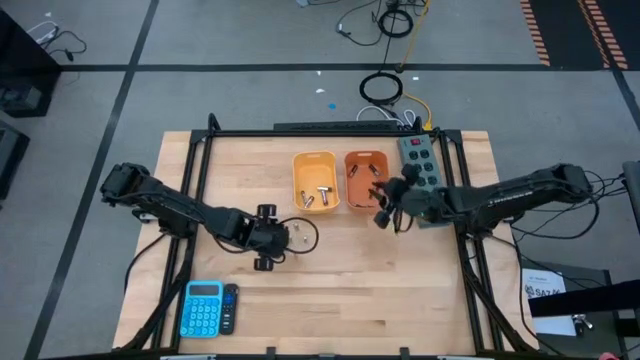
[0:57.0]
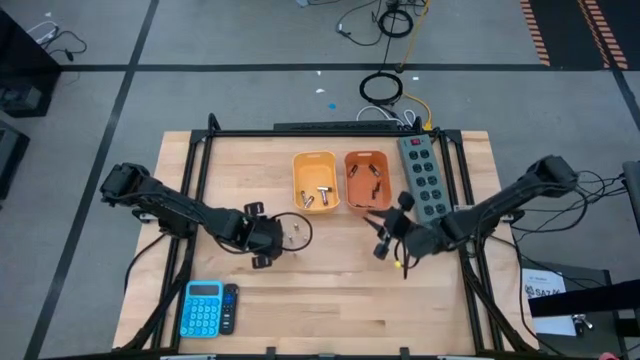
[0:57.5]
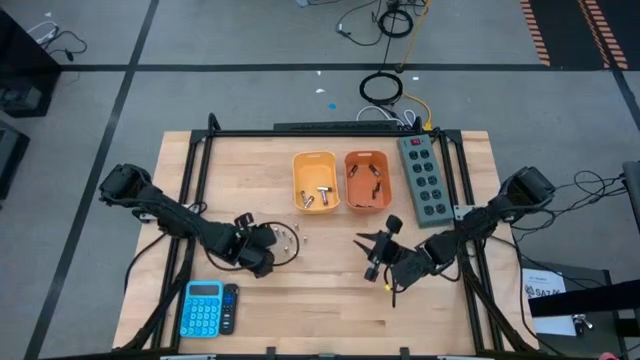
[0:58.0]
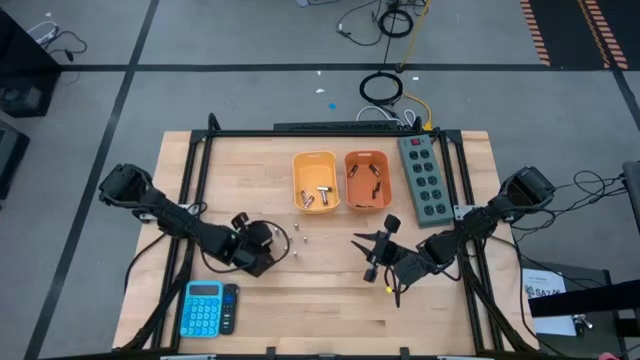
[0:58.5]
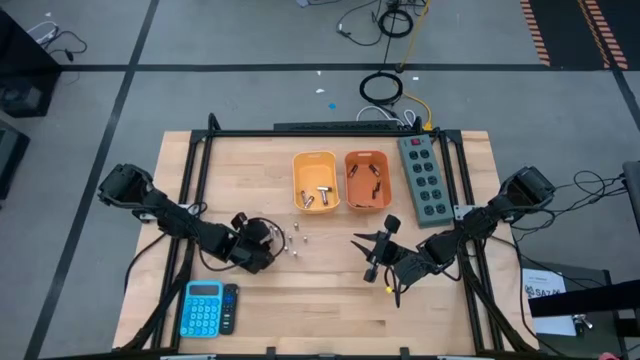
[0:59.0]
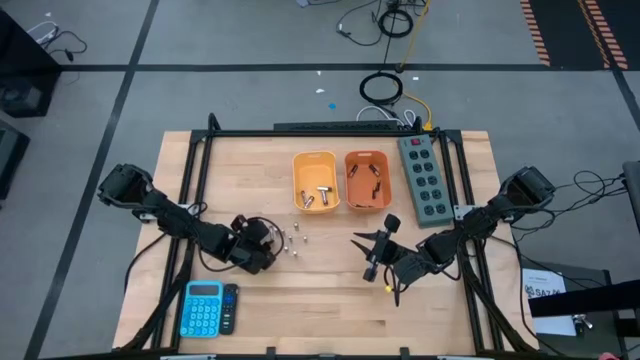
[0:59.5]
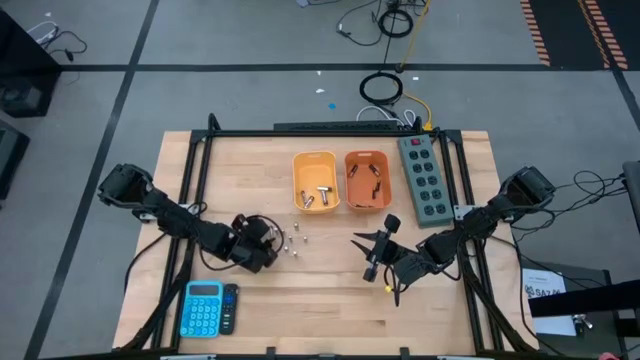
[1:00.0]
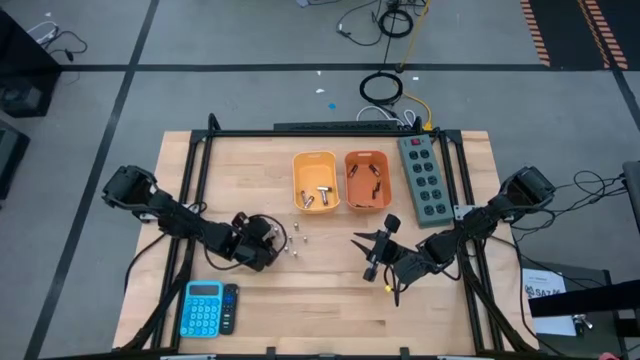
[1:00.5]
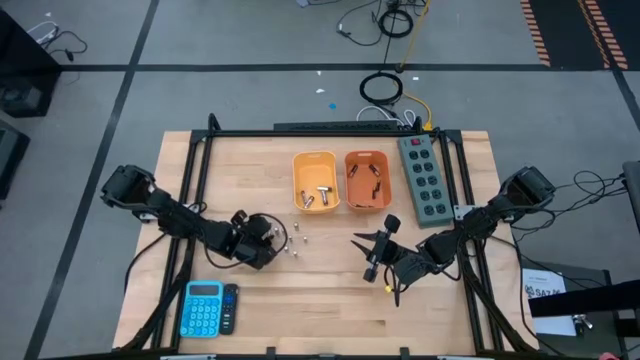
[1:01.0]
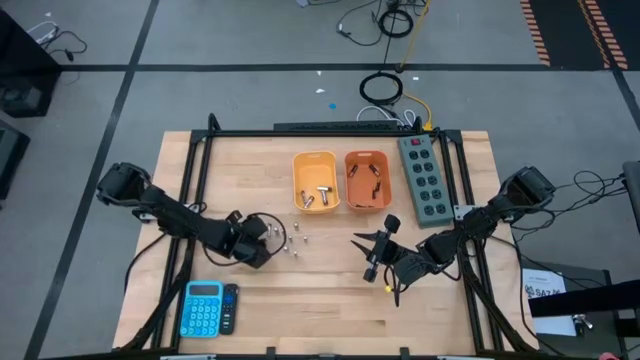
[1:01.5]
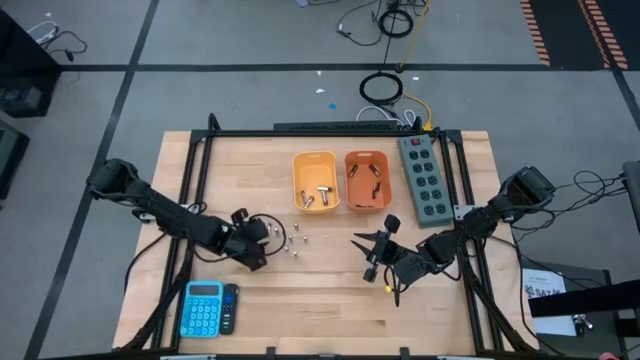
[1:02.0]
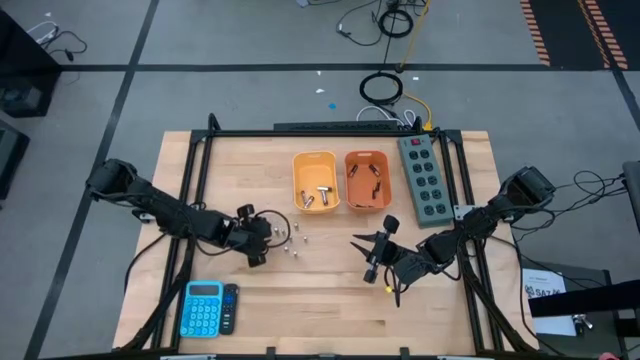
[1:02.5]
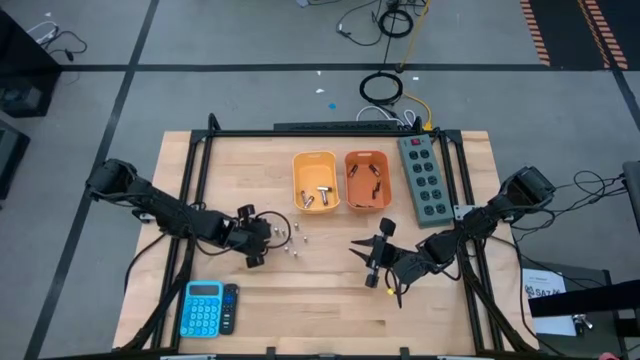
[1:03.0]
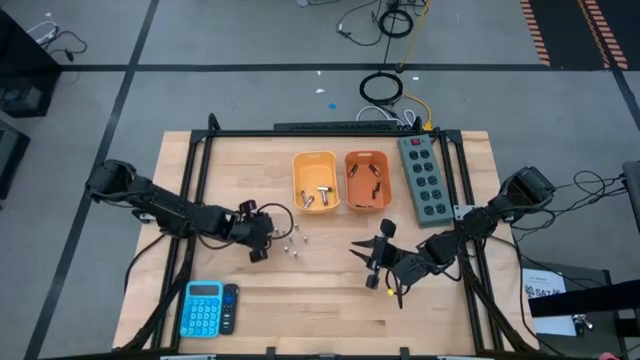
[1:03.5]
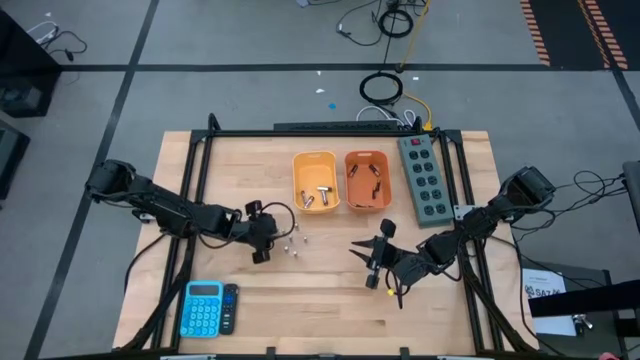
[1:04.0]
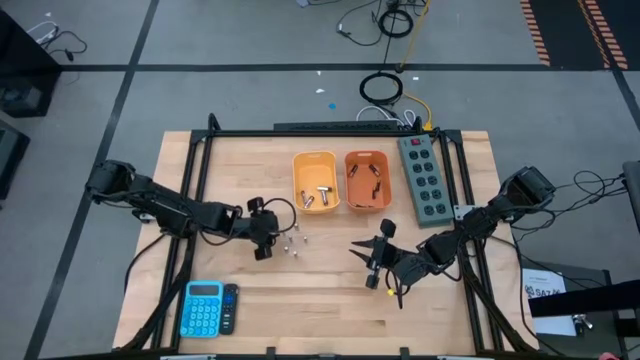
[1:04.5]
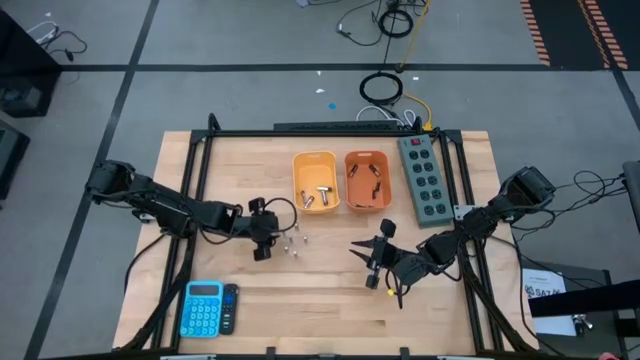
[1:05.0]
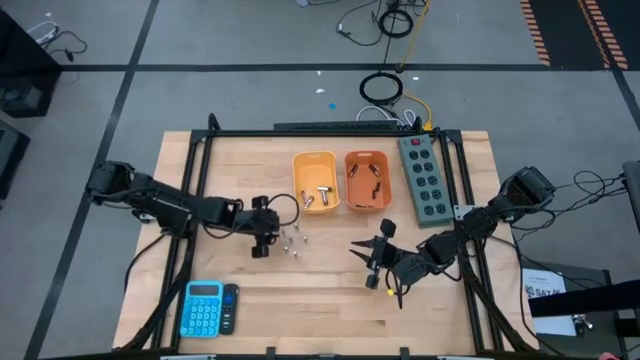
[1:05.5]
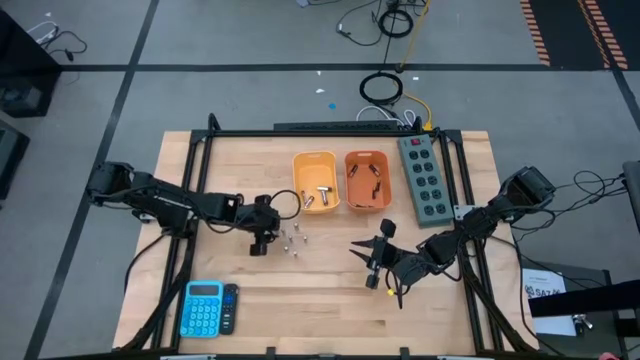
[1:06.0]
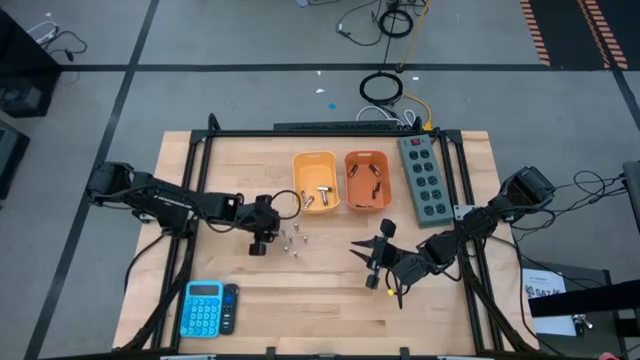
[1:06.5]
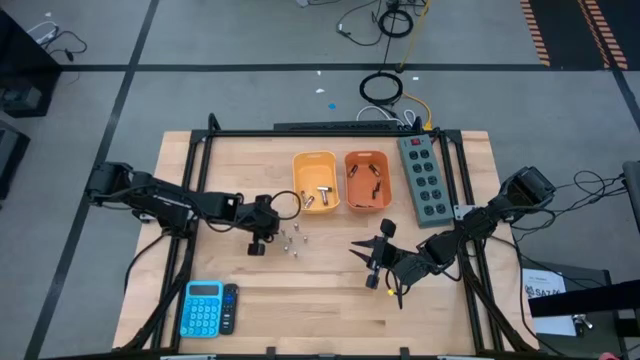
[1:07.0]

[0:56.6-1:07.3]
Task: Sort batteries
Put the silver battery into the yellow bin

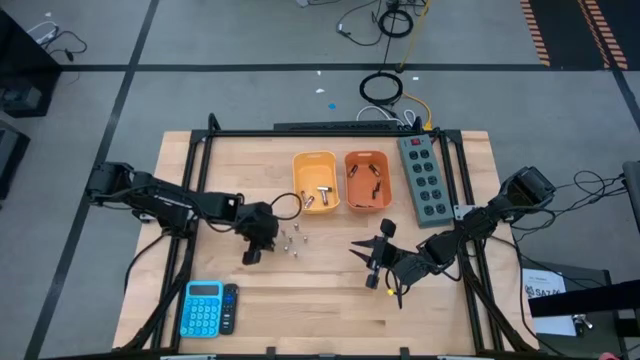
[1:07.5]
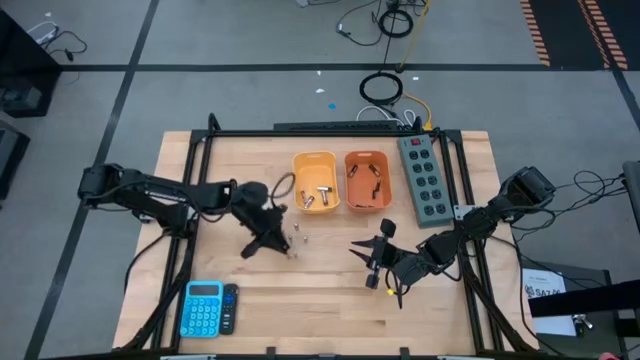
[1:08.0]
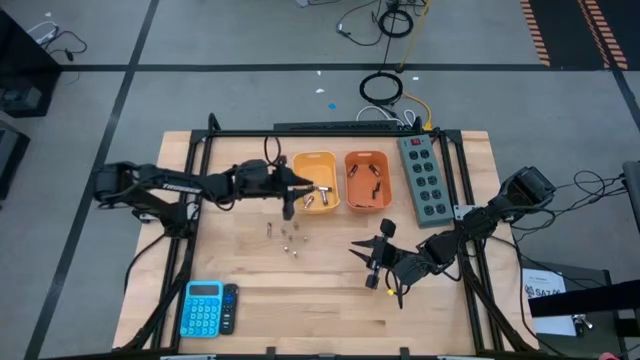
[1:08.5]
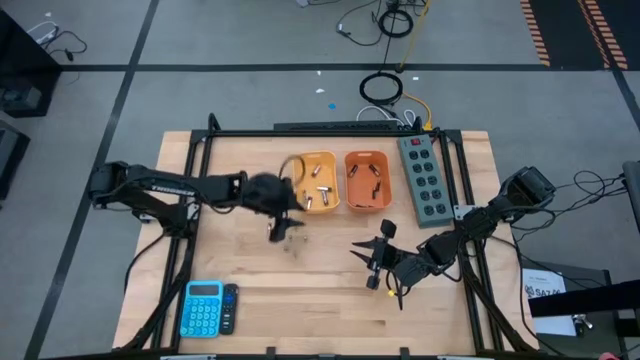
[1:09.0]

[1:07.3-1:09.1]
Put the silver battery into the yellow bin

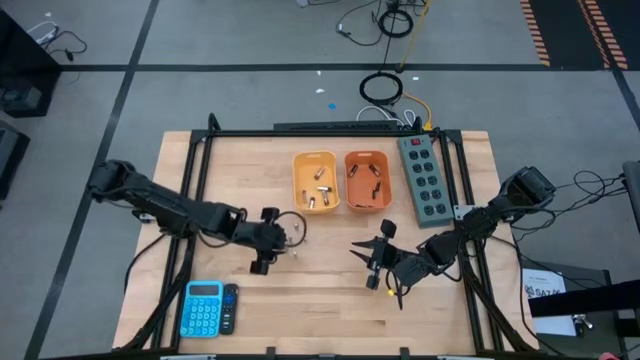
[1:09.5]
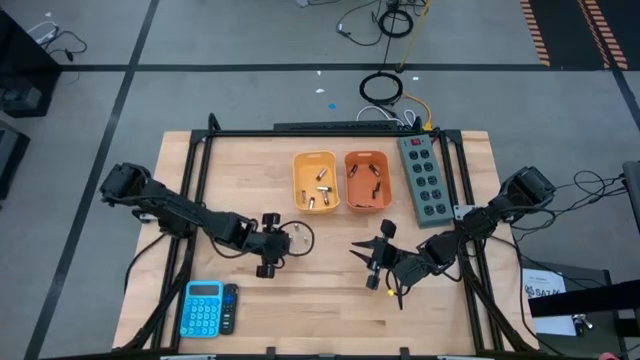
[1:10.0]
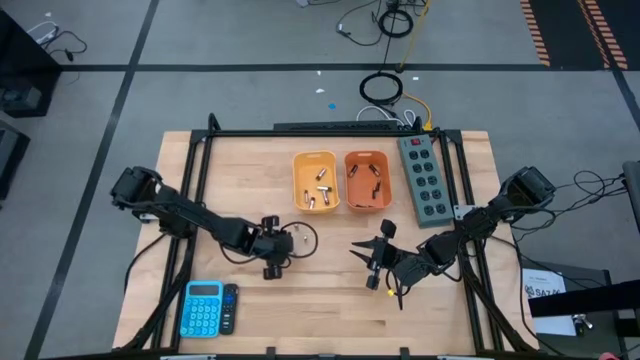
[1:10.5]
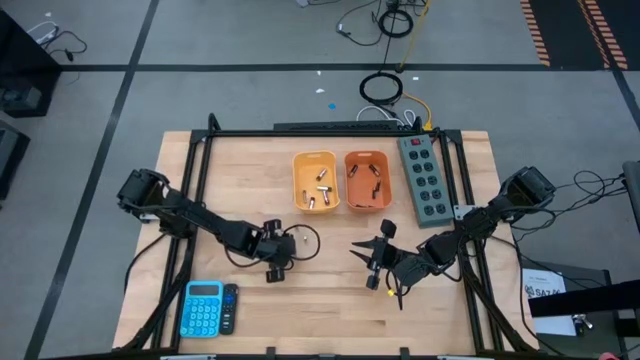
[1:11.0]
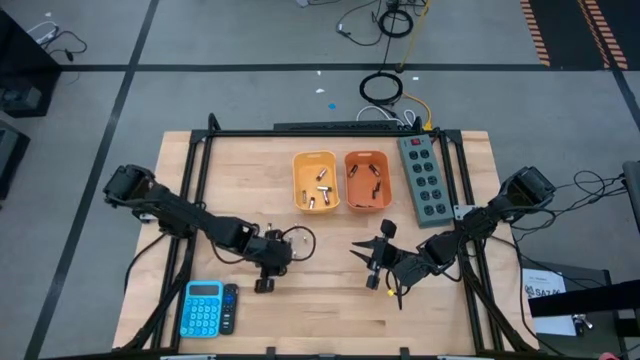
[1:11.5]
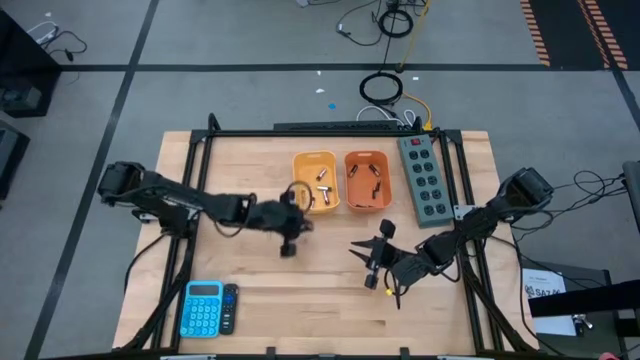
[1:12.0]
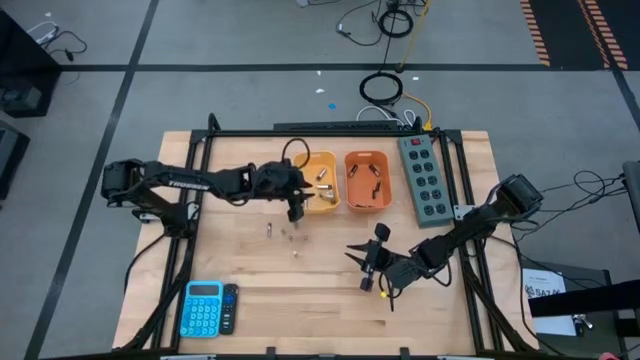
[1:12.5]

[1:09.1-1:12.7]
Put the silver battery into the yellow bin

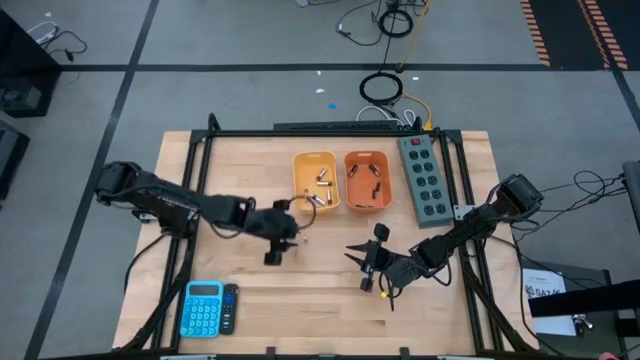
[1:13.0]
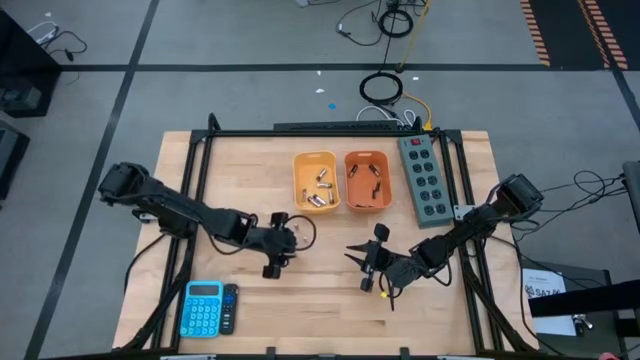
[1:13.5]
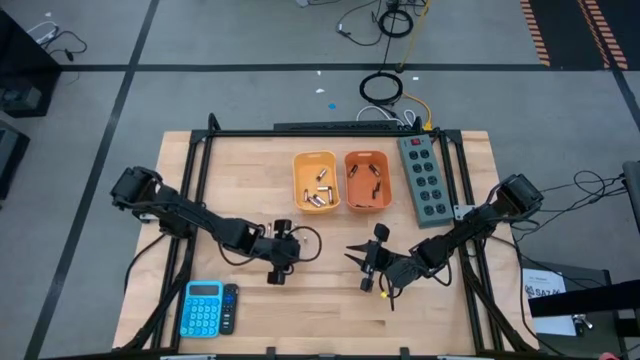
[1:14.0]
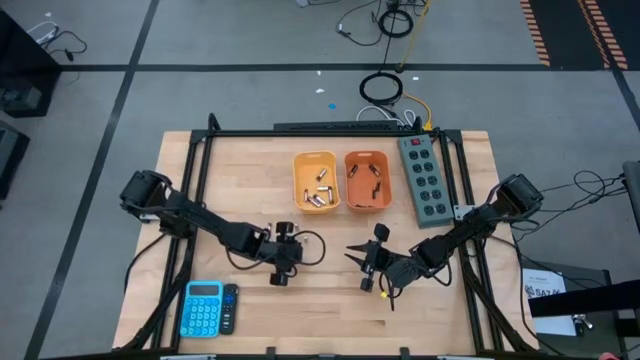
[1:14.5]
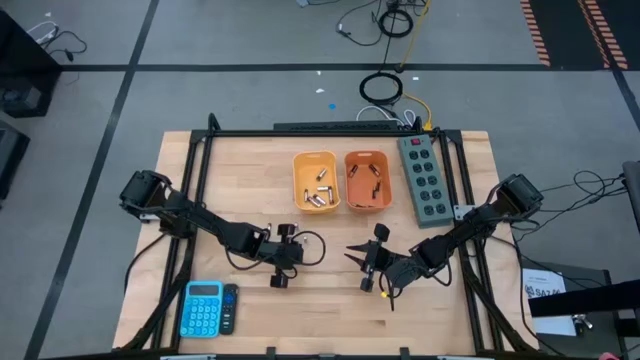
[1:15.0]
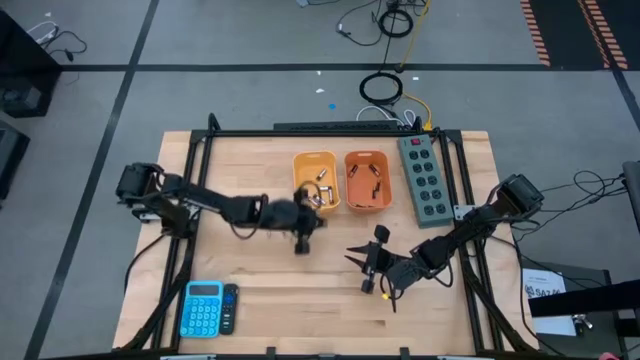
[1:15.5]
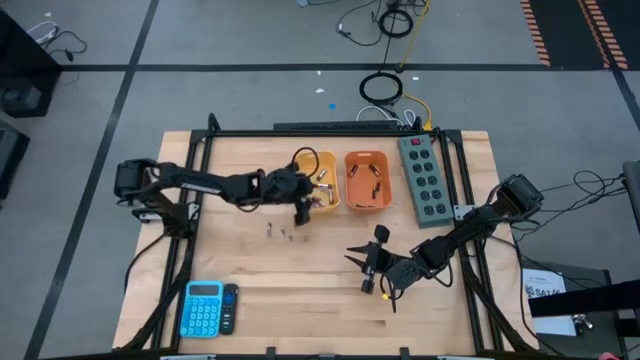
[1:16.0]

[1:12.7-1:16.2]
Put the silver battery into the yellow bin

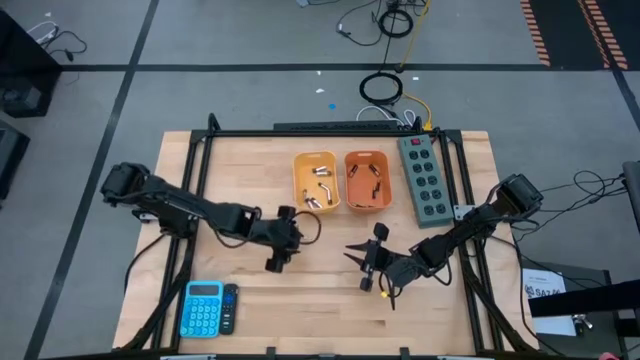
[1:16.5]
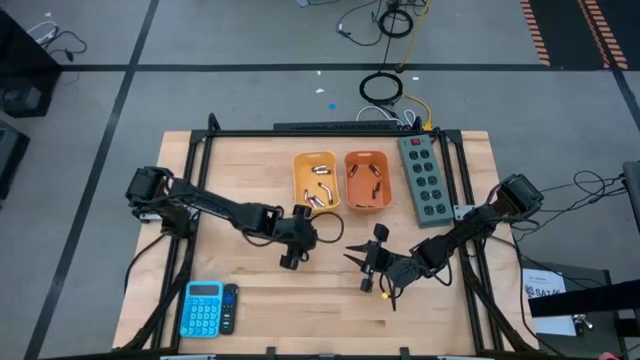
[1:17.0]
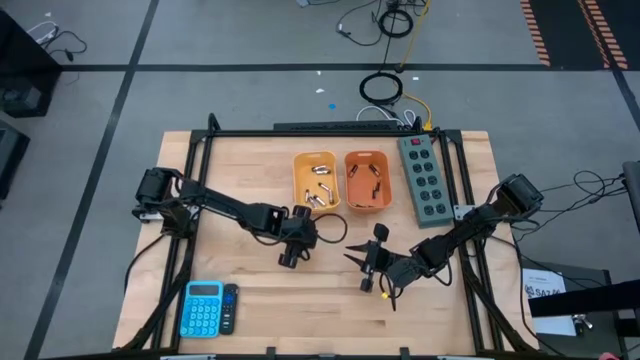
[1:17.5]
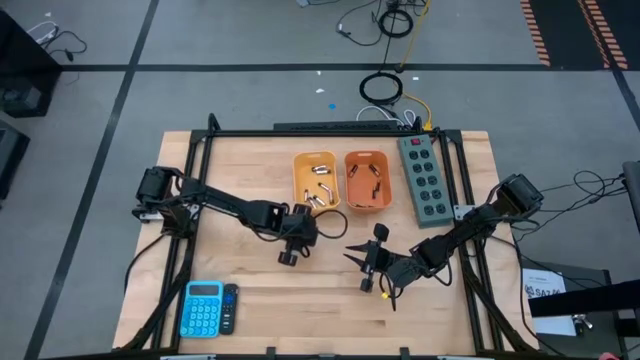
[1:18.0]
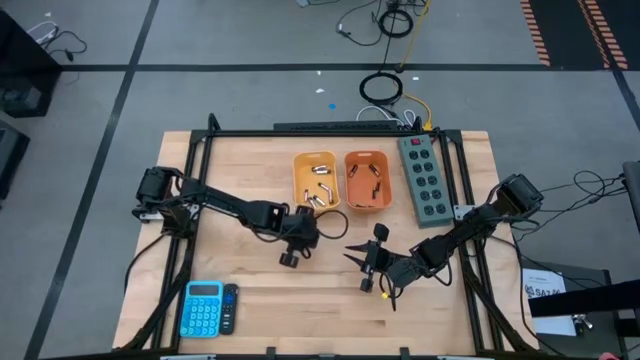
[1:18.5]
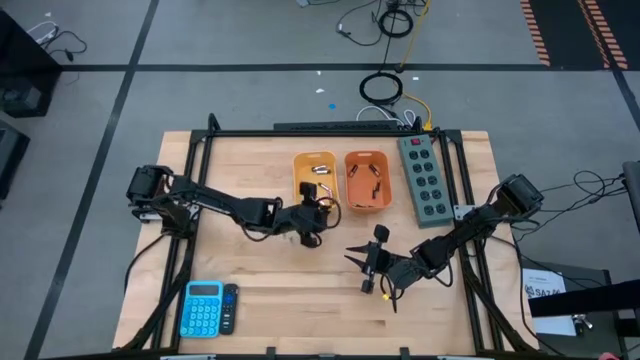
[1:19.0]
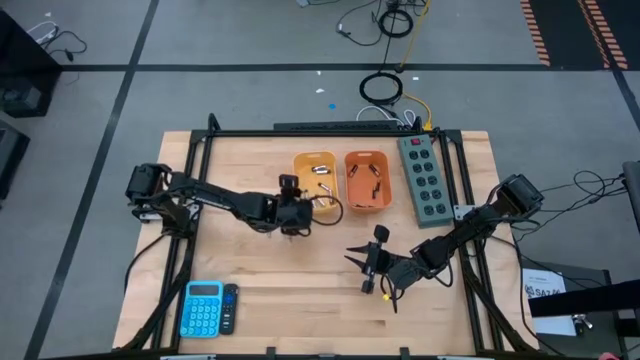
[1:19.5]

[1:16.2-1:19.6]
Put the silver battery into the yellow bin
